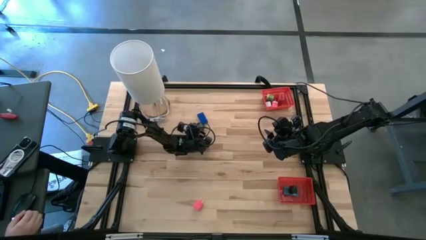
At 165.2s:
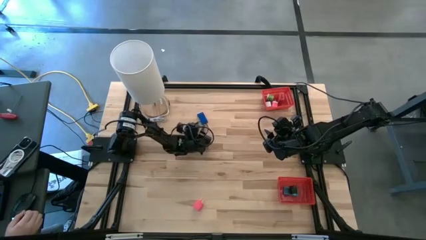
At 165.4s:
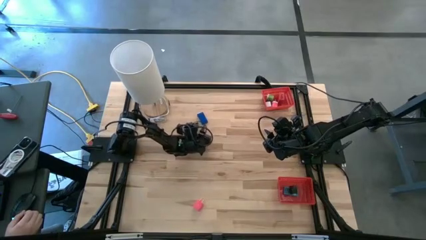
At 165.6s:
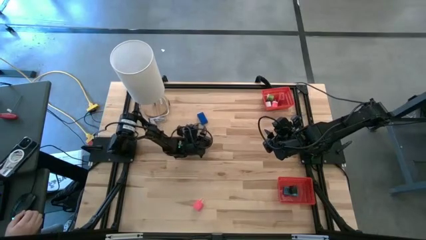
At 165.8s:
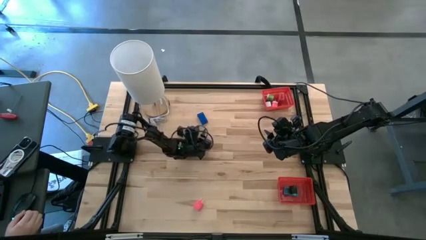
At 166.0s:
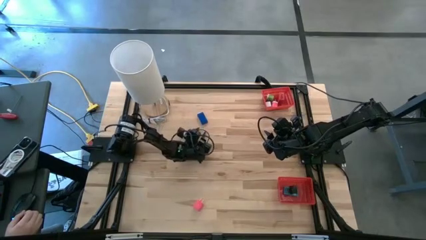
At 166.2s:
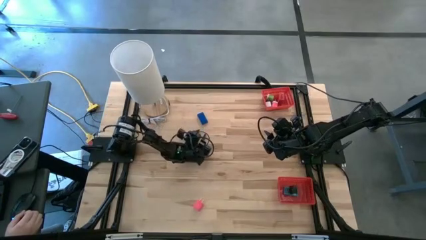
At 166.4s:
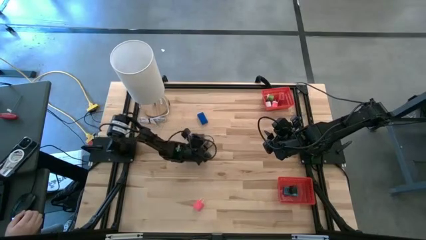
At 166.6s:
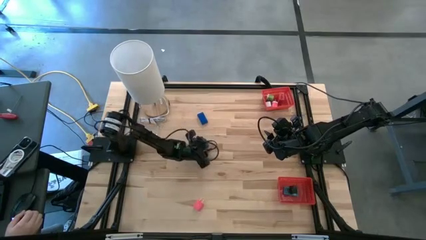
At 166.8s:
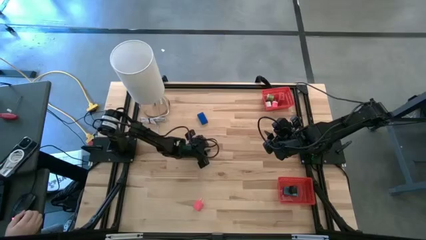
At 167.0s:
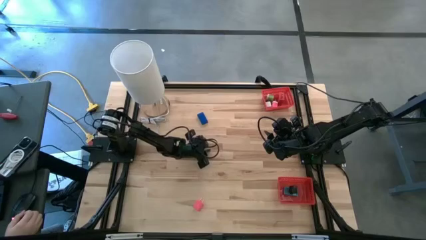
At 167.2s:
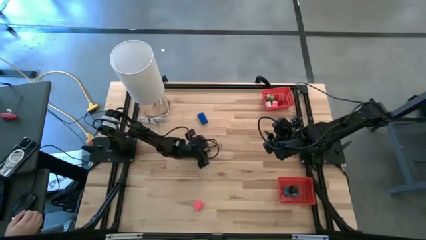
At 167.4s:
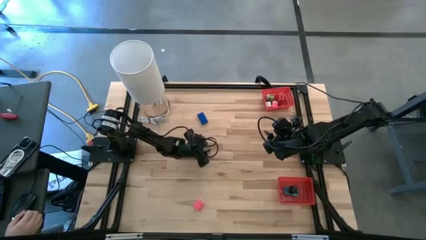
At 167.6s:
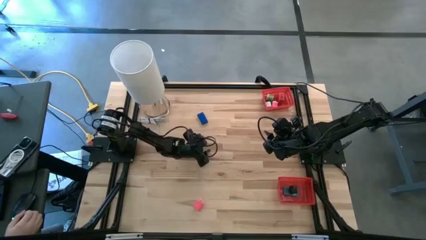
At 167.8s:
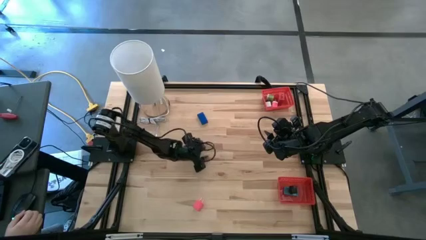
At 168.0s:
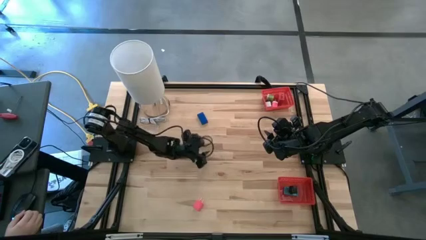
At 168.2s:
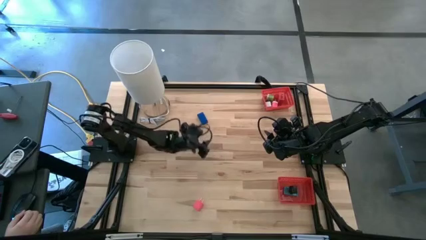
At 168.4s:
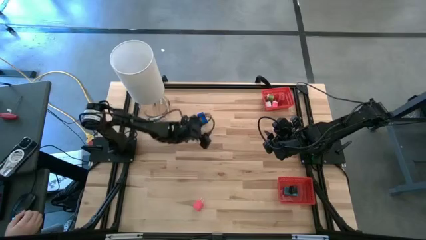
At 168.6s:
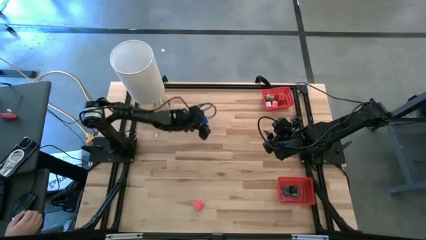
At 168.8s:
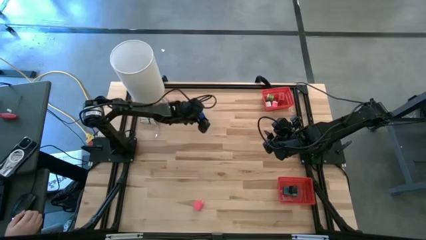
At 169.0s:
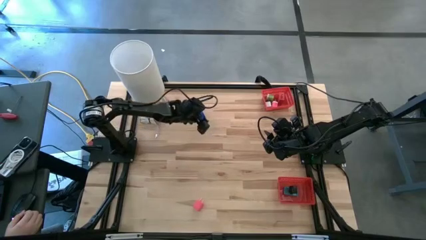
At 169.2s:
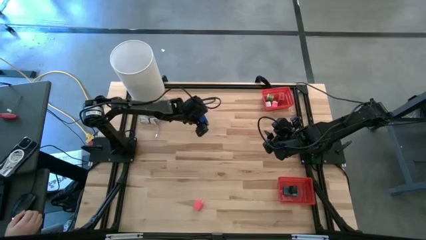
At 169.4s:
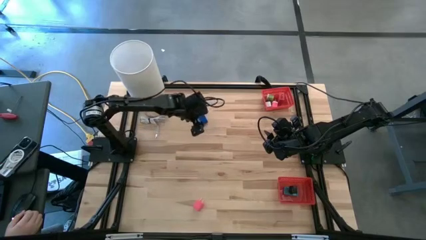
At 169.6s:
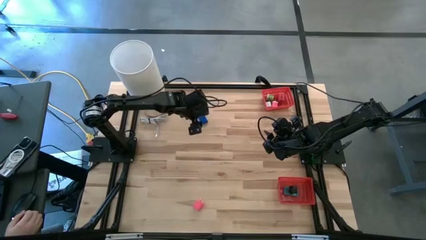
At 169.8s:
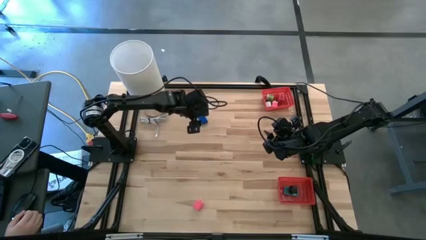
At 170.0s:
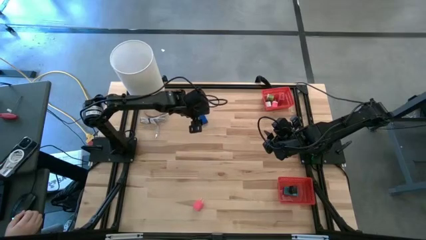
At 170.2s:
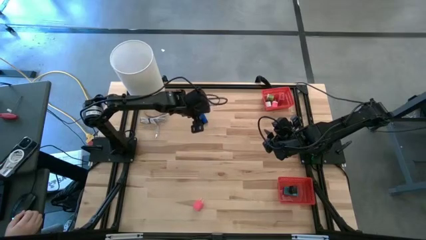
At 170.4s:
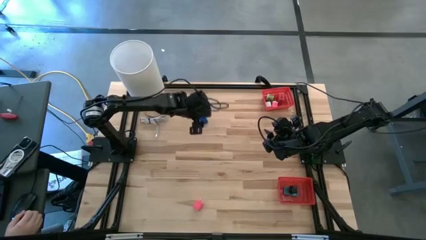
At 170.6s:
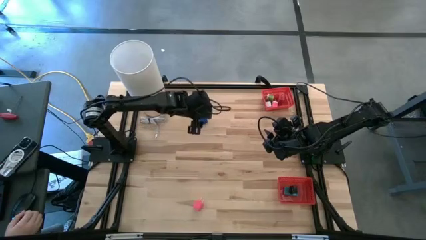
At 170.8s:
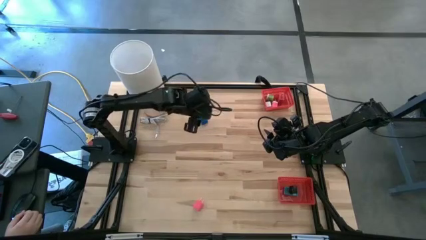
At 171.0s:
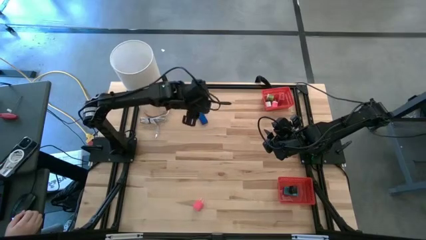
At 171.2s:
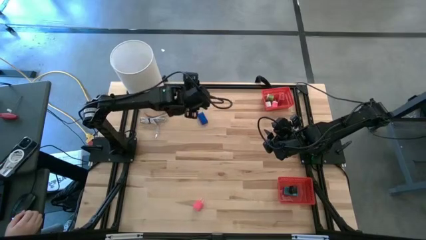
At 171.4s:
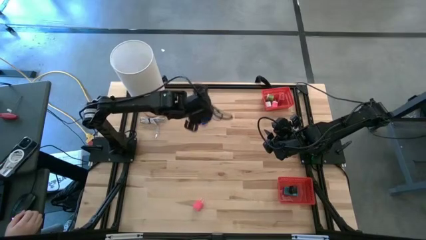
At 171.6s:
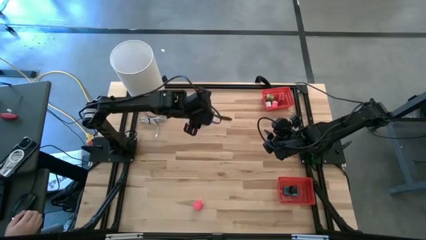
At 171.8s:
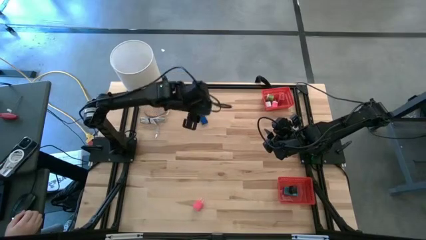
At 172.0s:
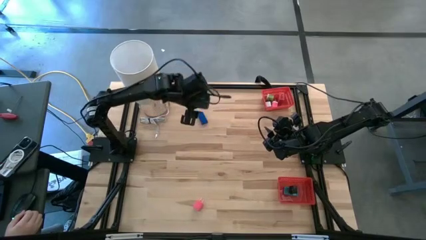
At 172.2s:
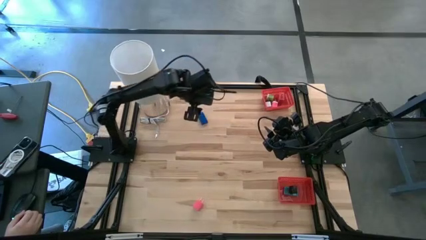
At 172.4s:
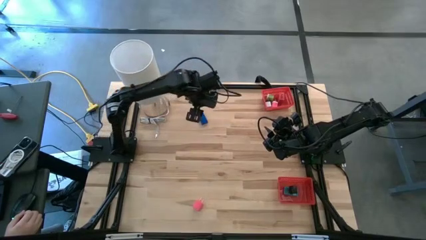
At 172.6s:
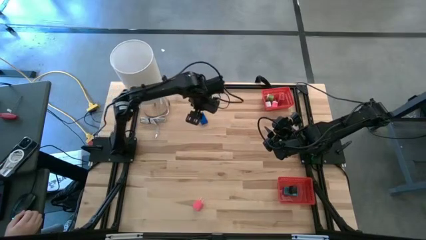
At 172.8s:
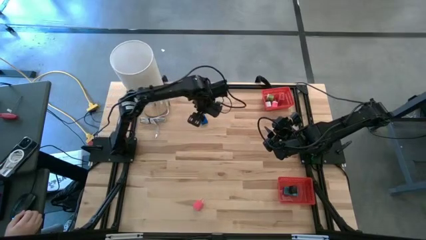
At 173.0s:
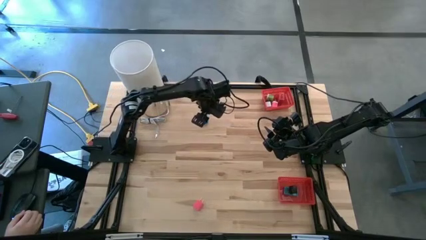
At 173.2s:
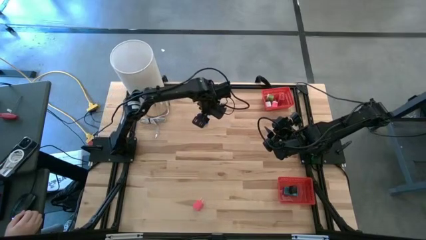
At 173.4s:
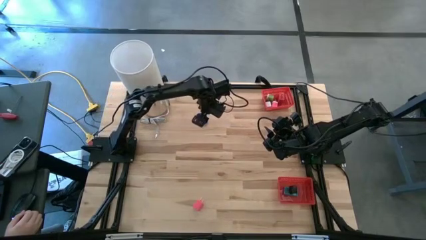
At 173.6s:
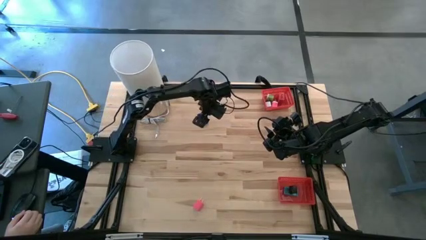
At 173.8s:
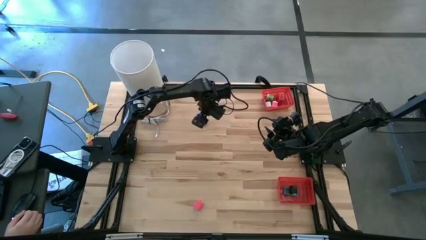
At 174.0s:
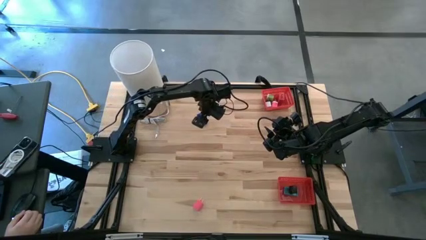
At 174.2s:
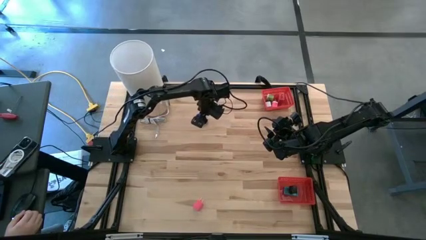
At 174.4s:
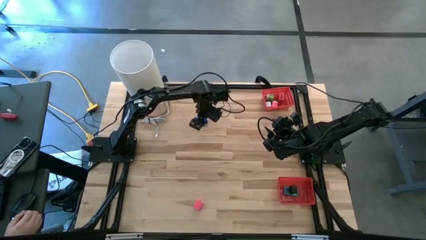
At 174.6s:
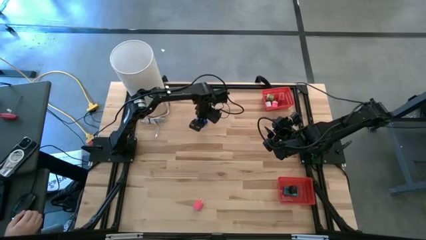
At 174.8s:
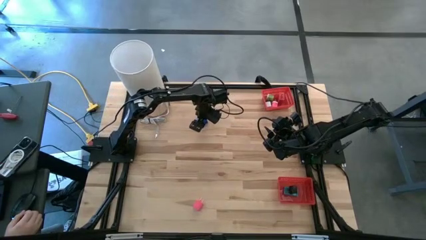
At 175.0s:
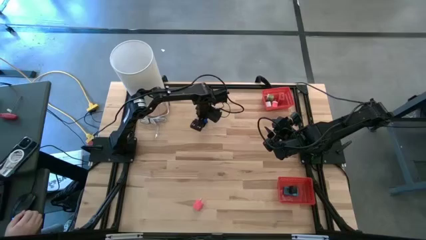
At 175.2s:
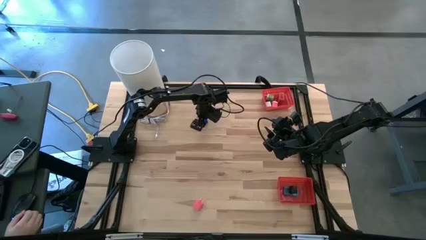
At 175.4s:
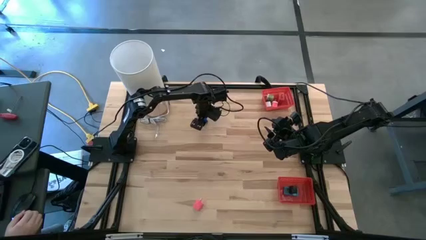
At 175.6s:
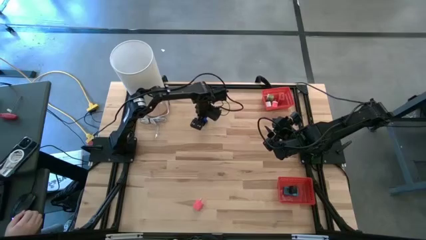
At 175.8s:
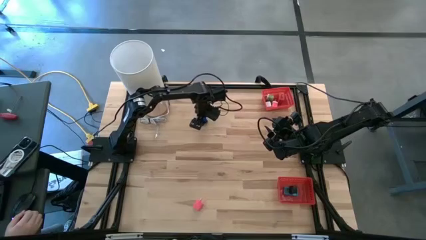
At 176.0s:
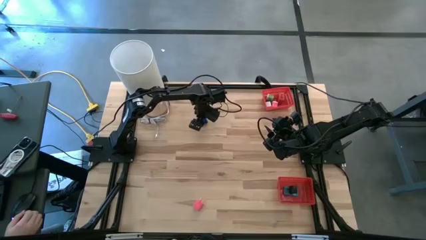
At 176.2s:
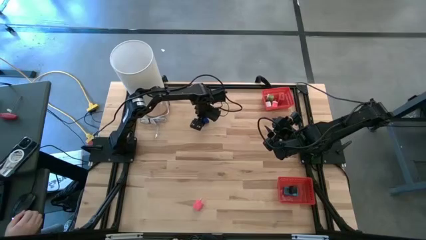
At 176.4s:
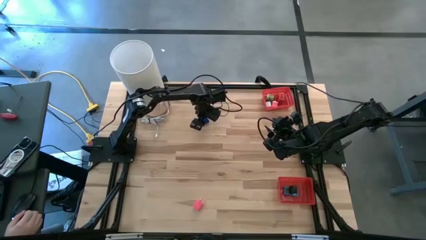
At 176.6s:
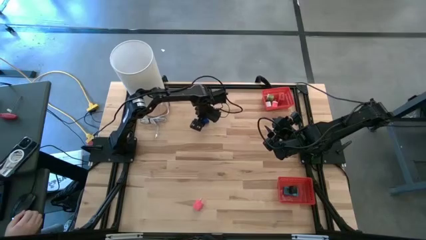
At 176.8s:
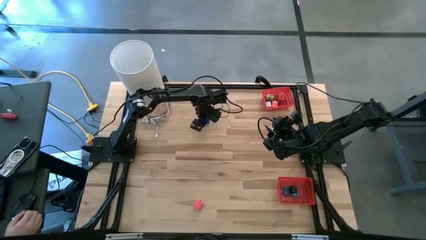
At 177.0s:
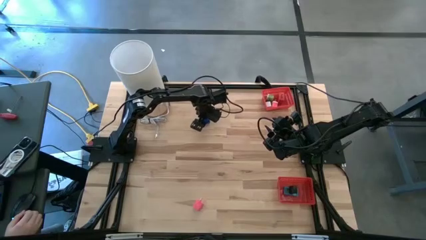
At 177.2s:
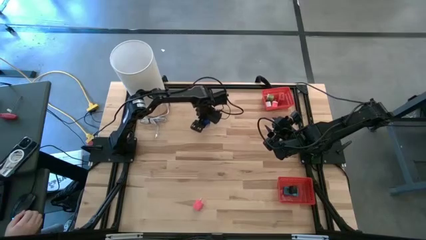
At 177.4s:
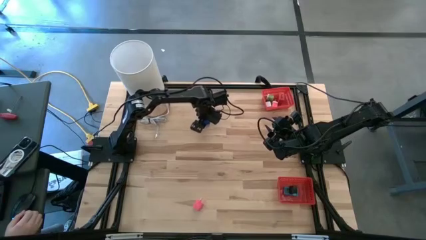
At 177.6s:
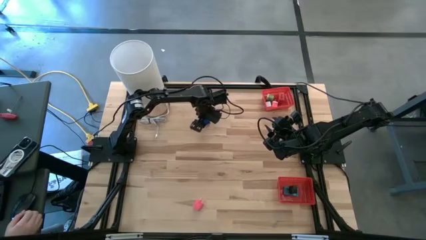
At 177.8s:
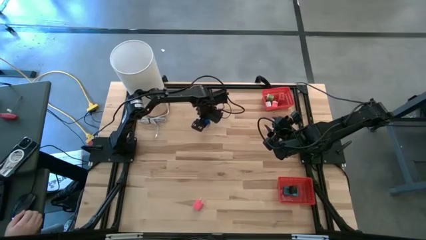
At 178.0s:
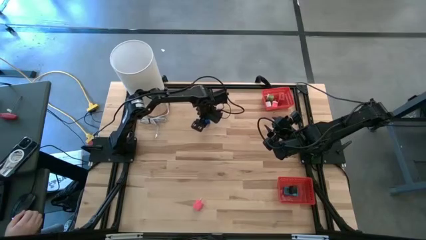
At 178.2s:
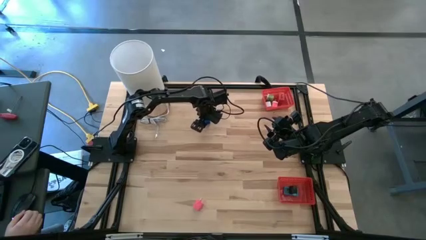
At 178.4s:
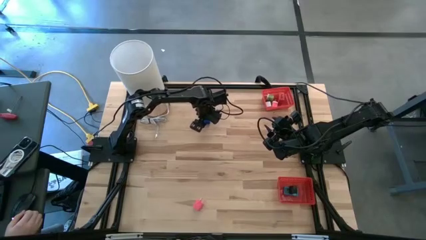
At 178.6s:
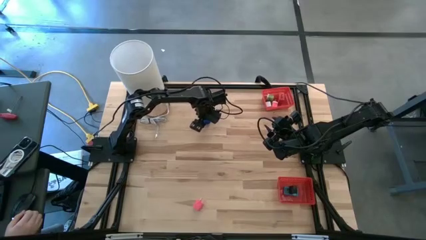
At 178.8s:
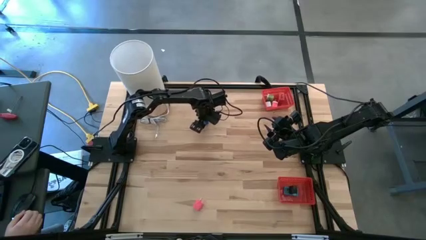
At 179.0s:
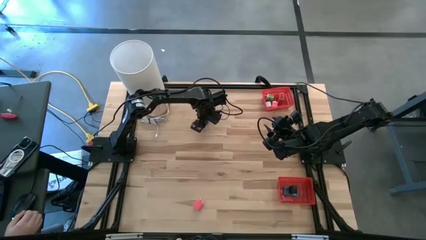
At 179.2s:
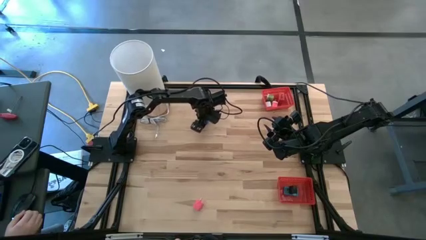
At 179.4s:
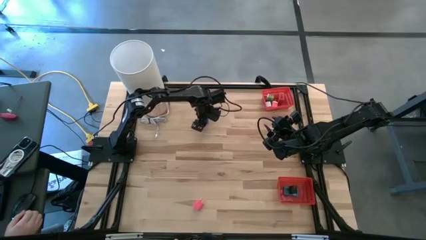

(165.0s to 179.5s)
Task: Pick & Place Office items
Put the blue digital clock into the bottom red basket
